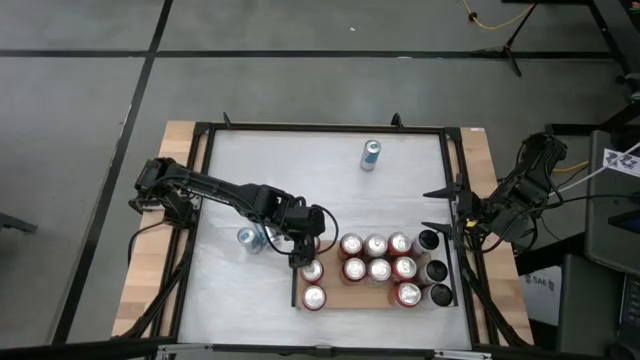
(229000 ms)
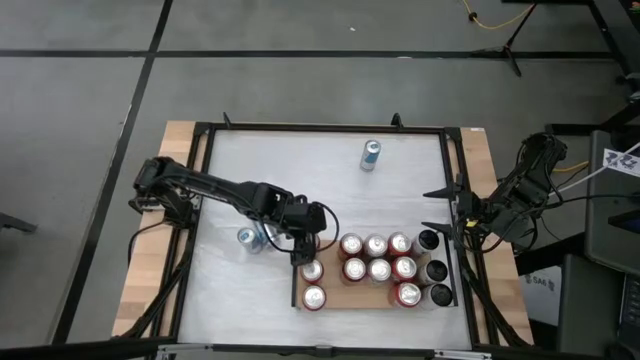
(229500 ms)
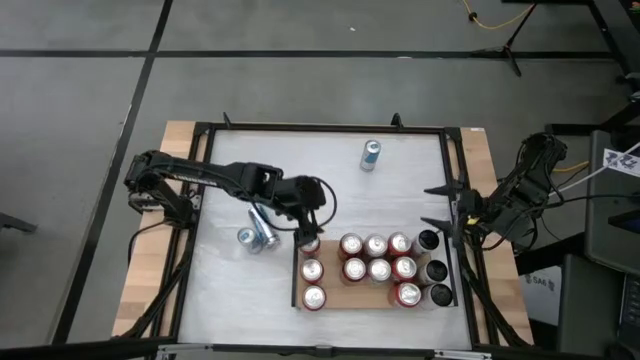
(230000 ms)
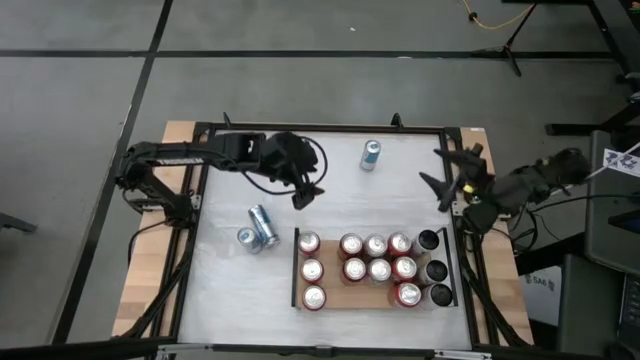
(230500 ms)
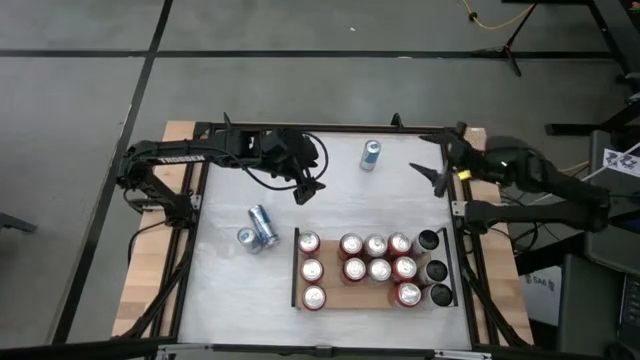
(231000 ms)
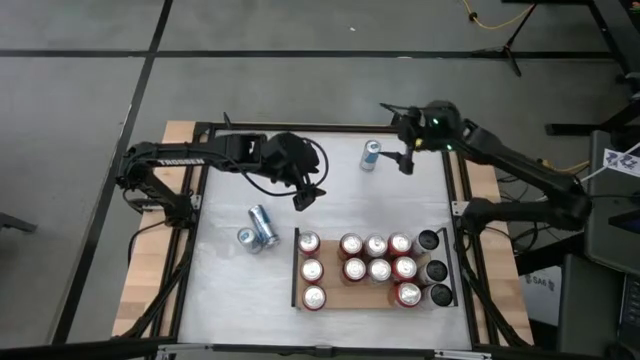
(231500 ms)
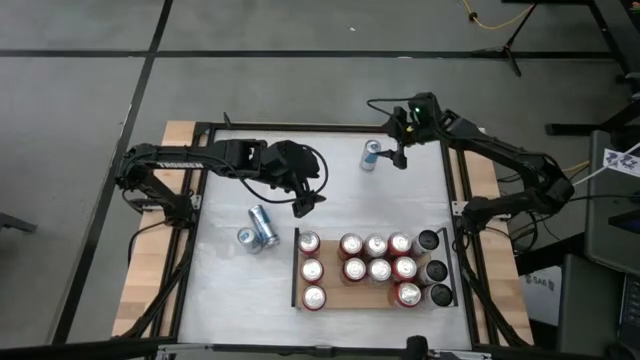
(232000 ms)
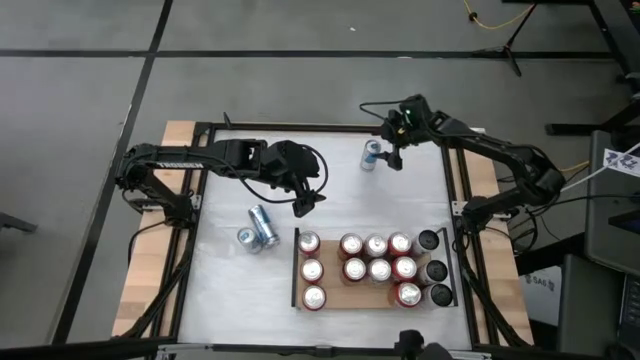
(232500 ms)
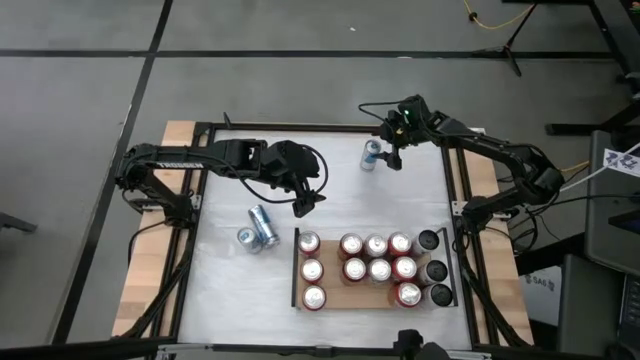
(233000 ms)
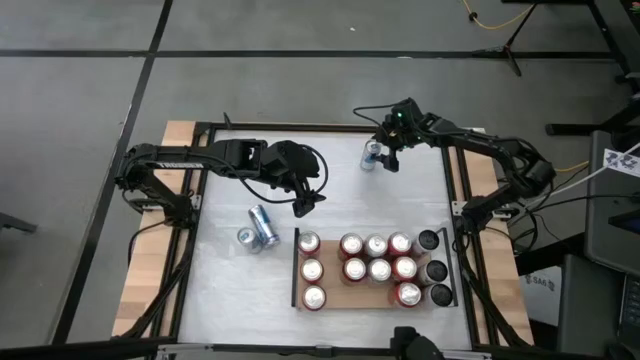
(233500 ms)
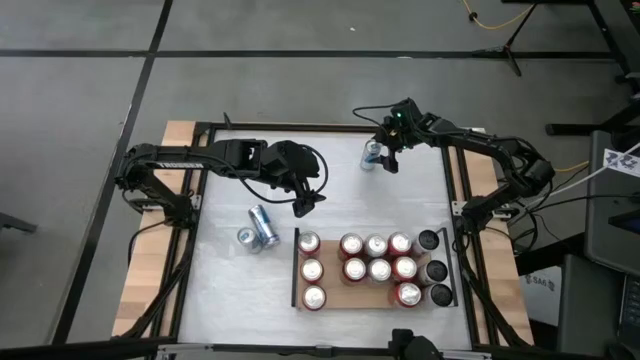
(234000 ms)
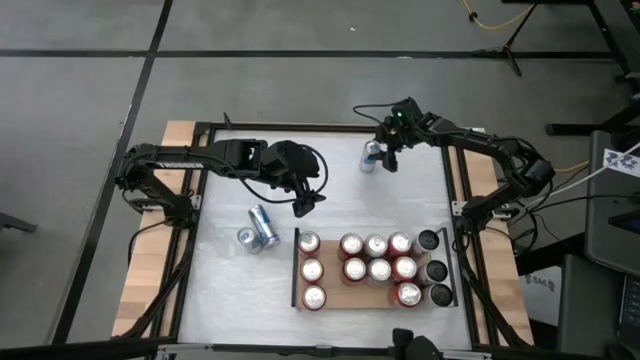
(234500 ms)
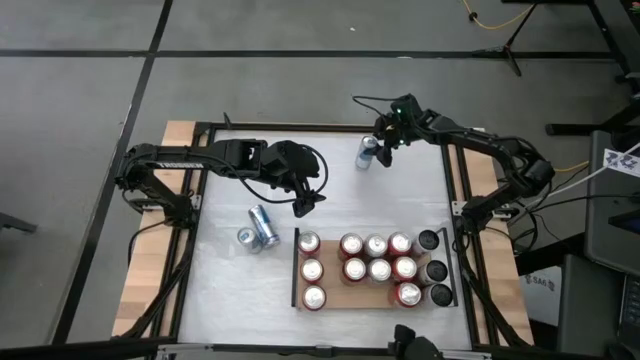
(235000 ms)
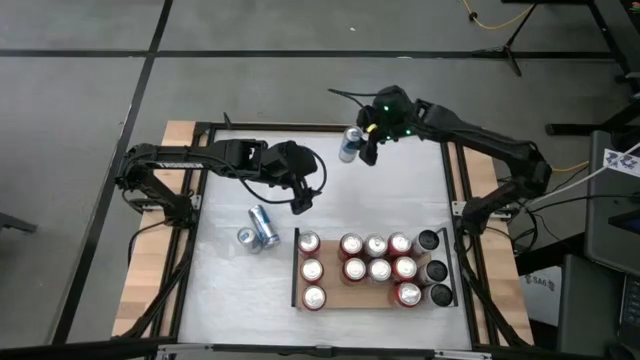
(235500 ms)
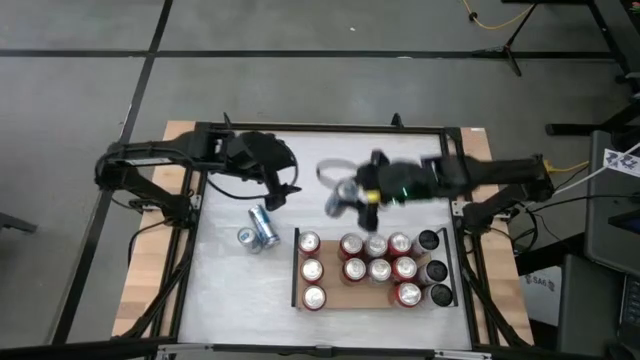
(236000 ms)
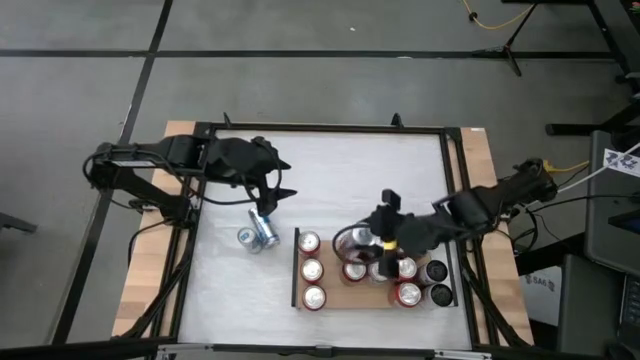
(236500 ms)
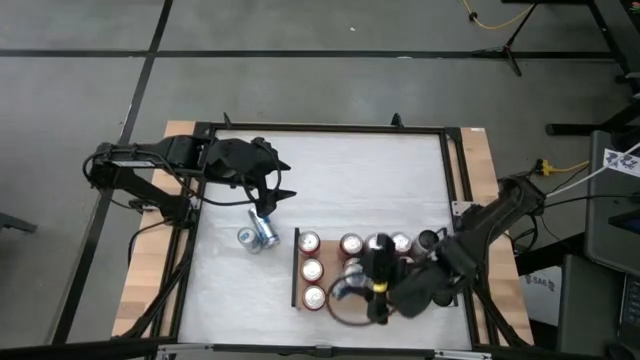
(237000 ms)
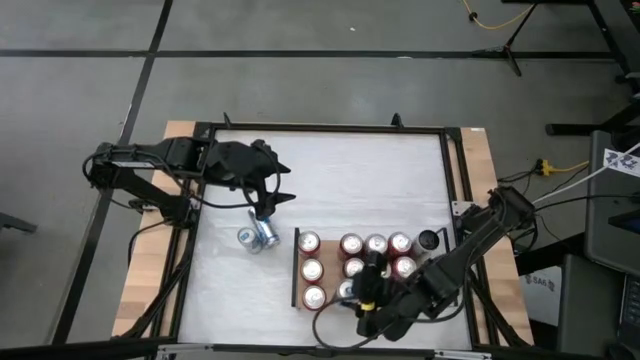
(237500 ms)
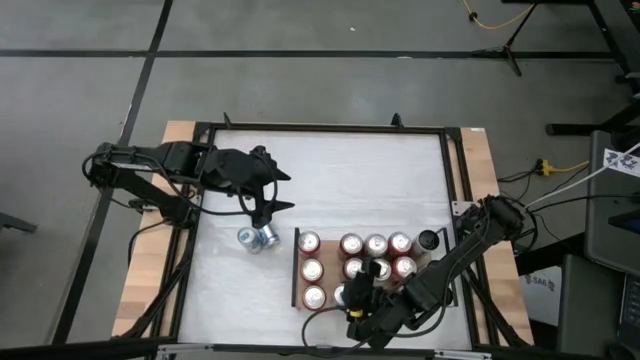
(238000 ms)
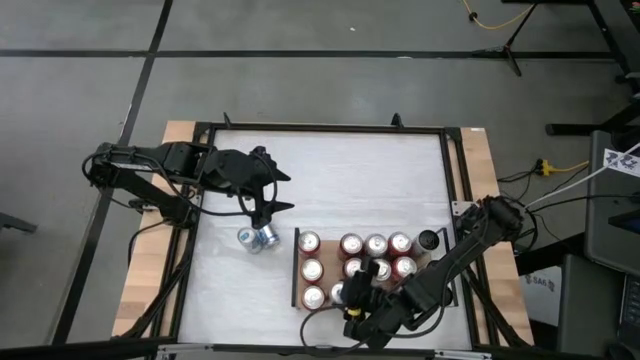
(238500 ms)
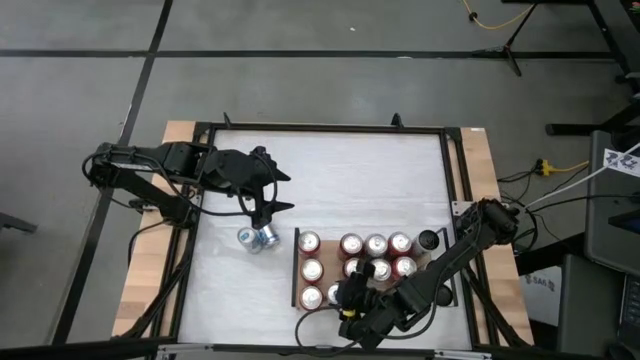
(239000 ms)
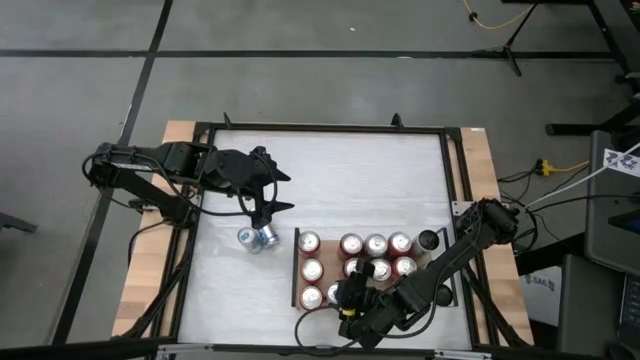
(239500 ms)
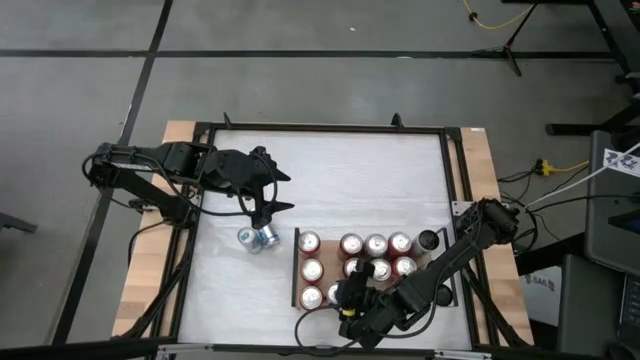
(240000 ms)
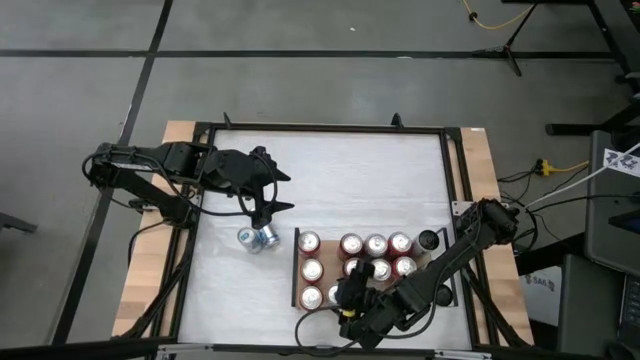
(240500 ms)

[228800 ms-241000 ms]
Task: Place canned beverage on shelf
Put the top right blue soda can on the shelf

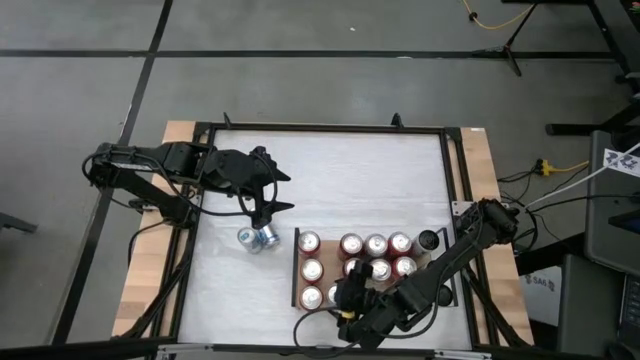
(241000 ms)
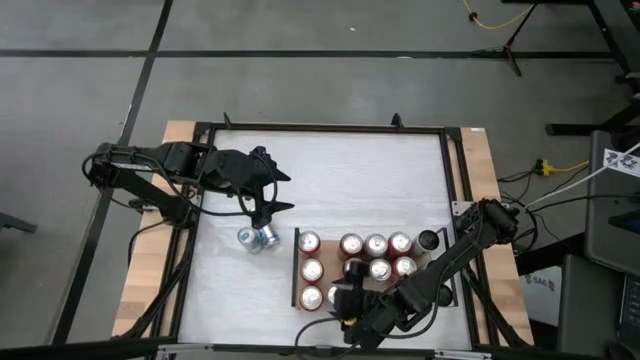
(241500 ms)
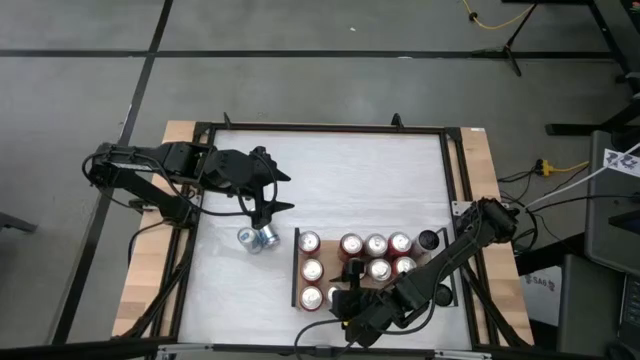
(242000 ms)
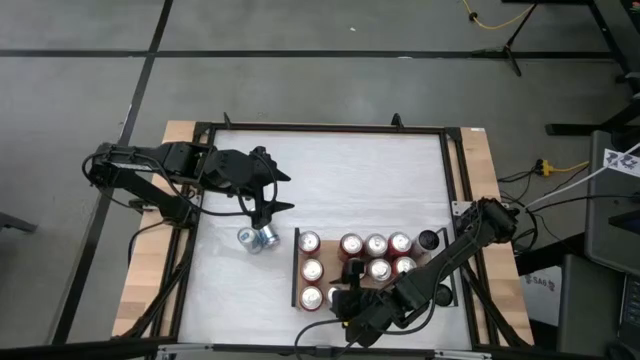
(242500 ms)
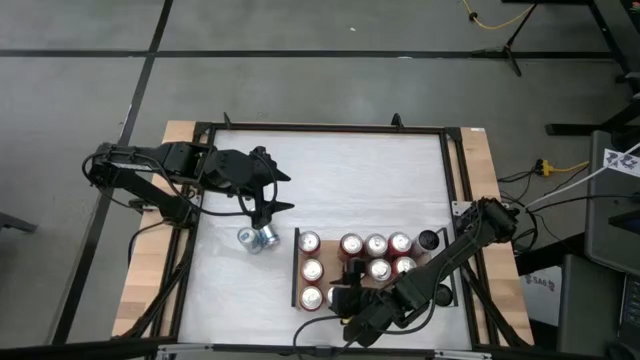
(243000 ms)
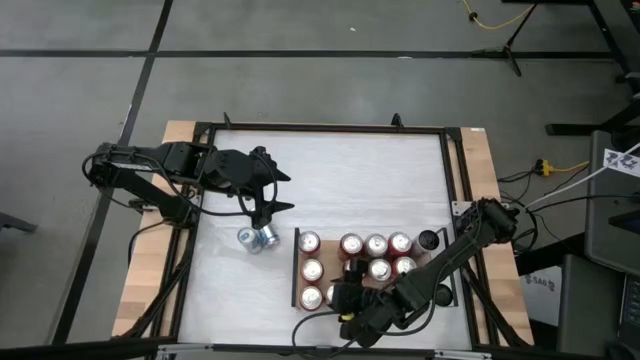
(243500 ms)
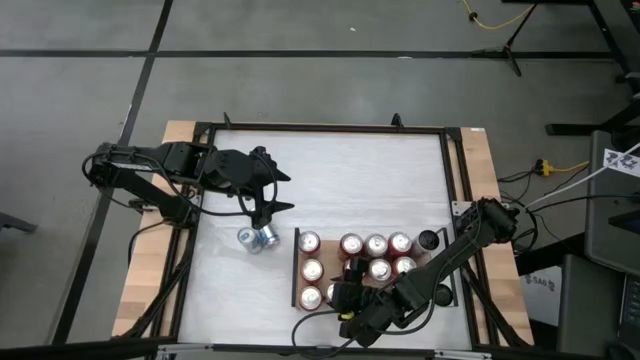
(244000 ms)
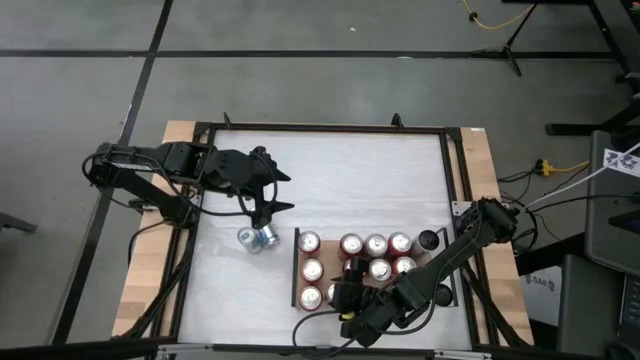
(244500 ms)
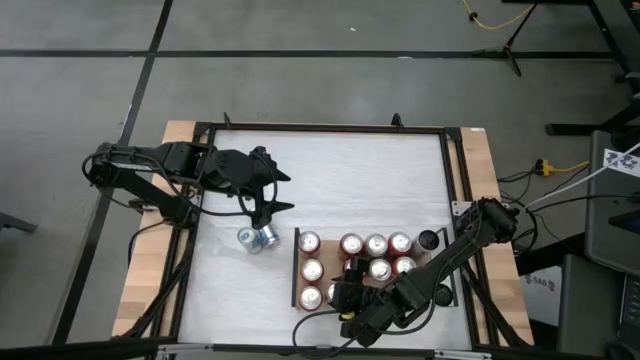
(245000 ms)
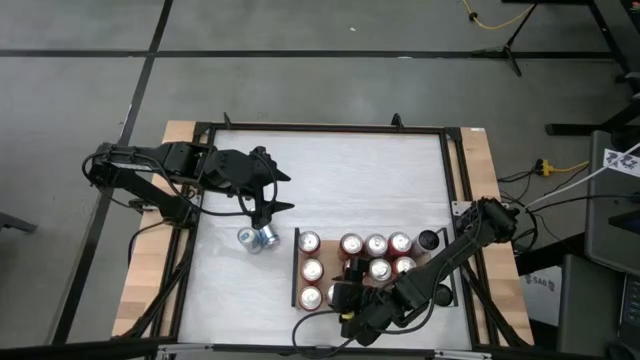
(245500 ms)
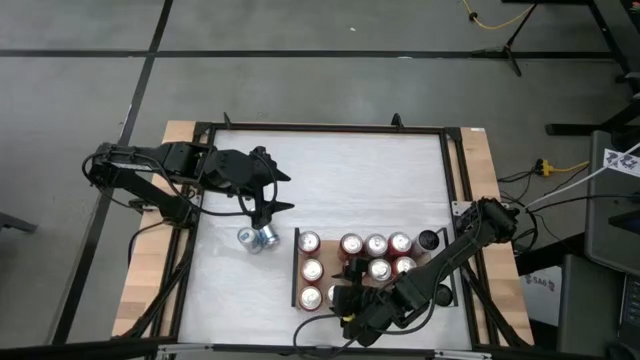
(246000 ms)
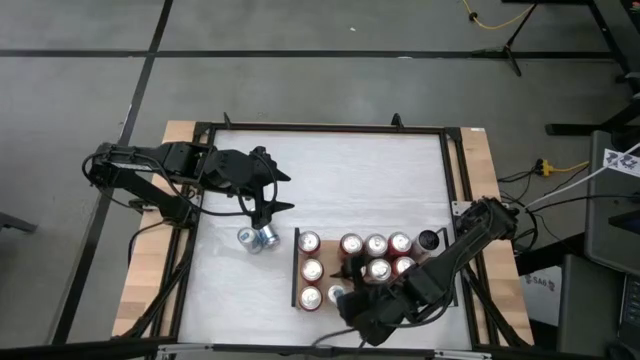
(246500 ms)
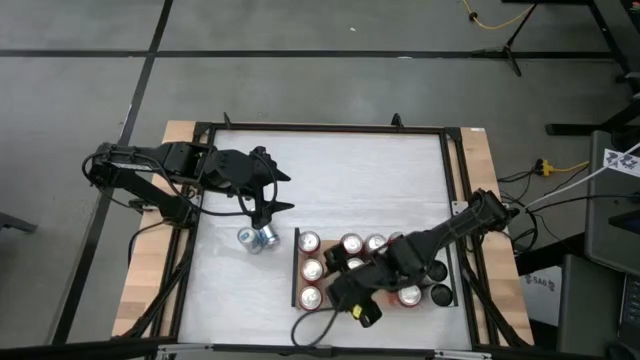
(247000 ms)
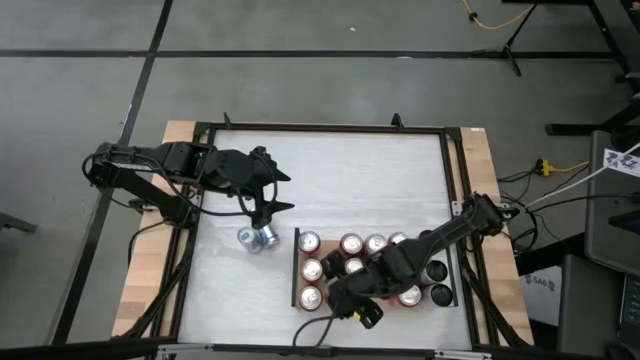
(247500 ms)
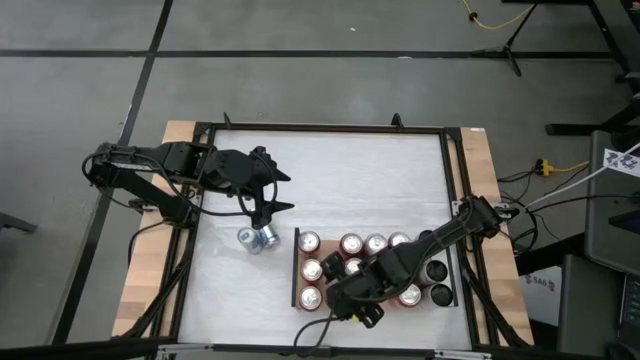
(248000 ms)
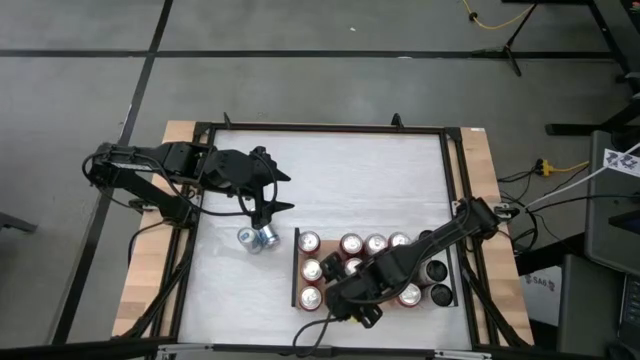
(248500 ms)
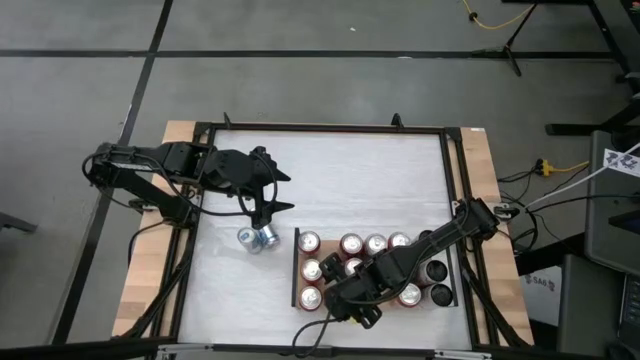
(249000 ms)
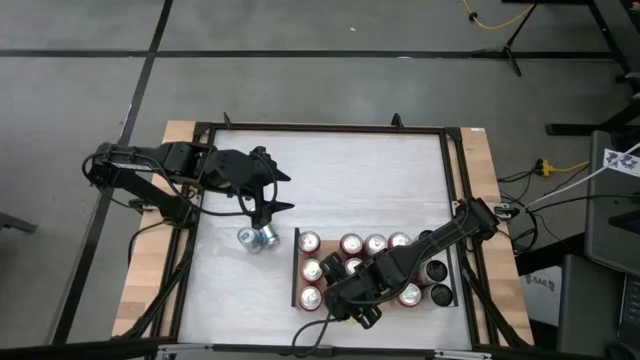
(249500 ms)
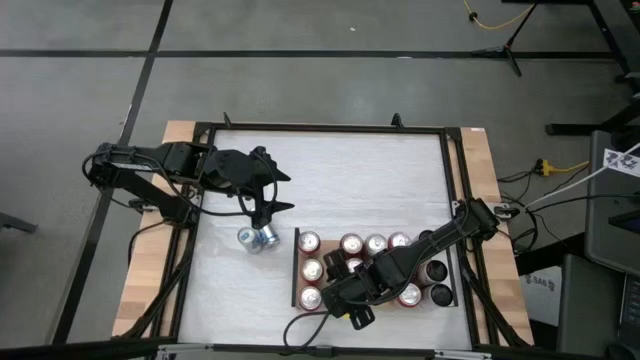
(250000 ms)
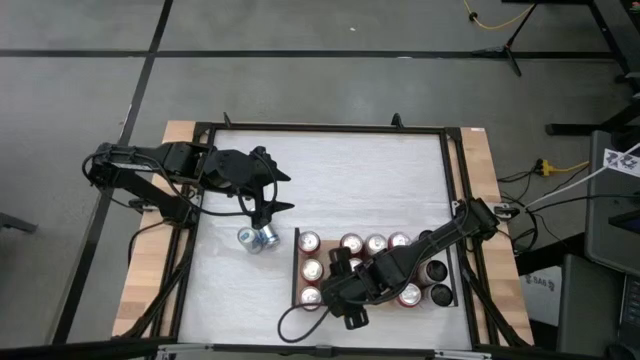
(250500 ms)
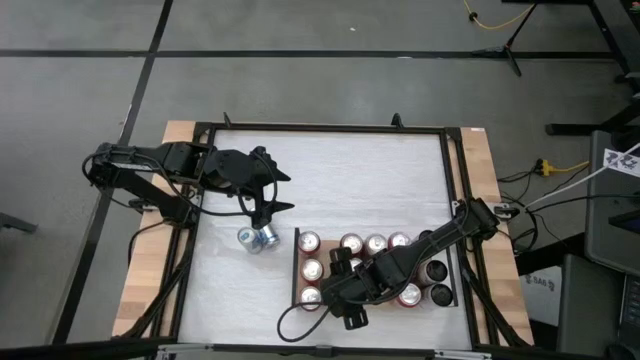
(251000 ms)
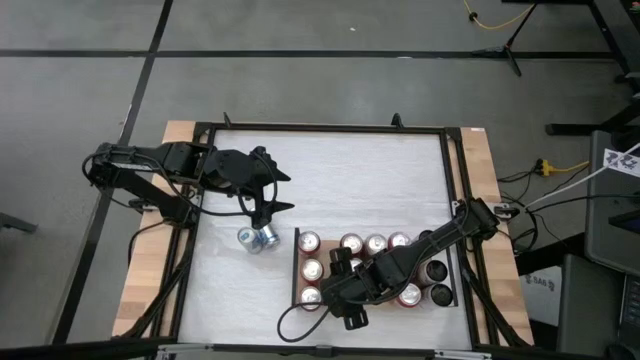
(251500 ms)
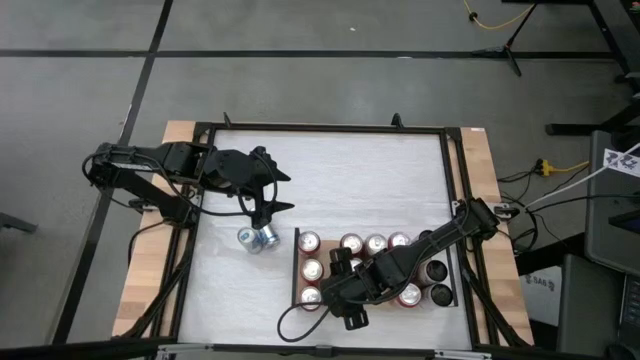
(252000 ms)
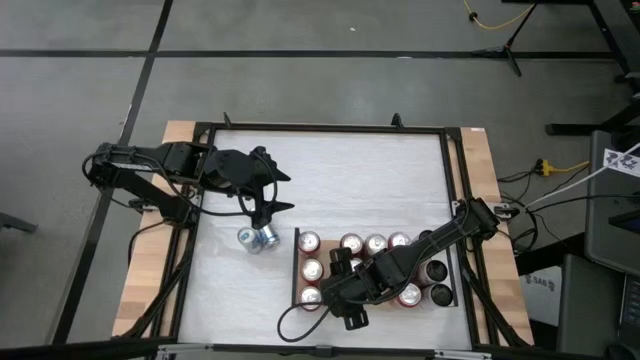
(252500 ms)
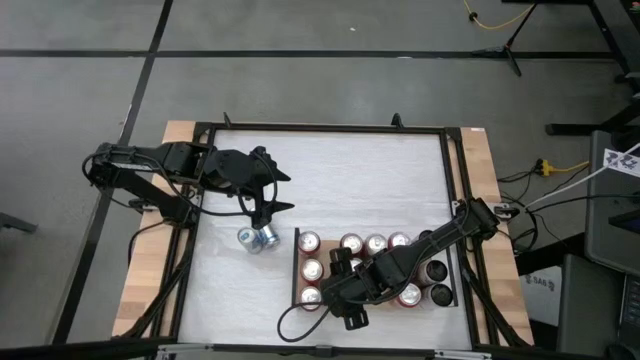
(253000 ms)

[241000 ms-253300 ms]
Put the top right blue soda can on the shelf
